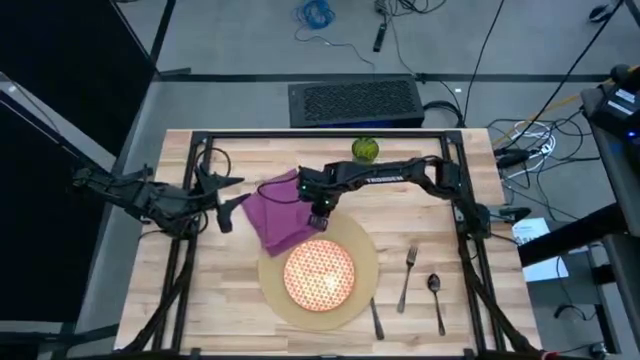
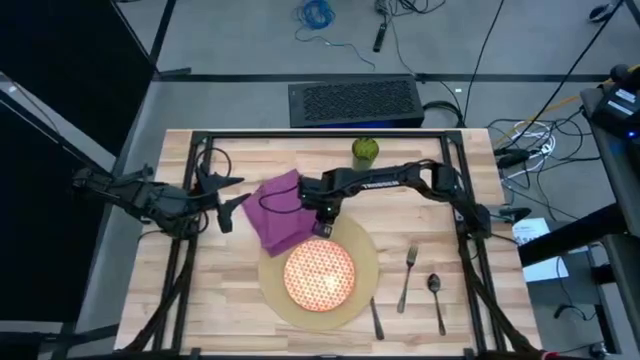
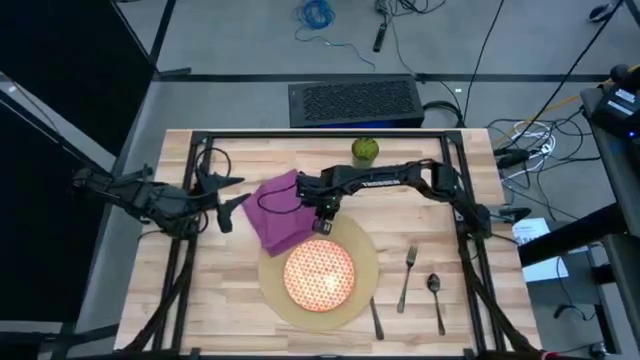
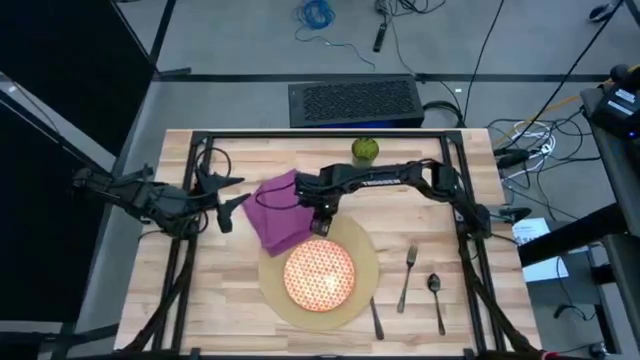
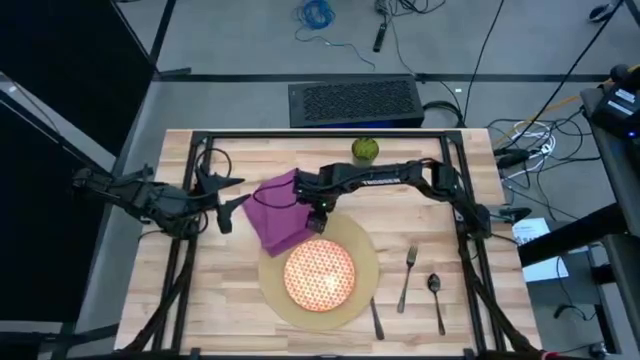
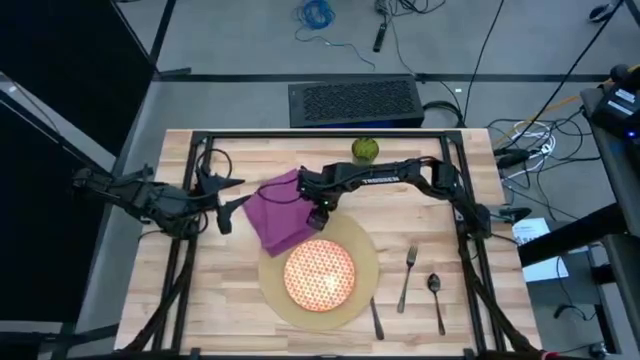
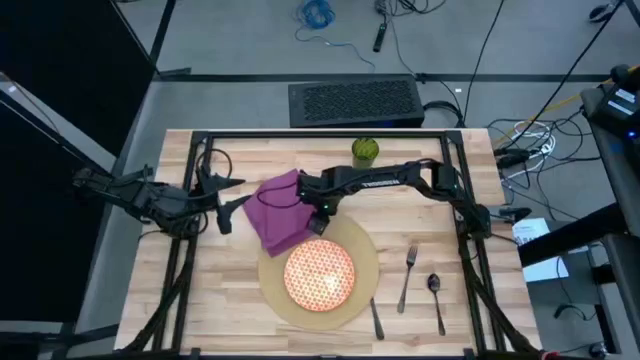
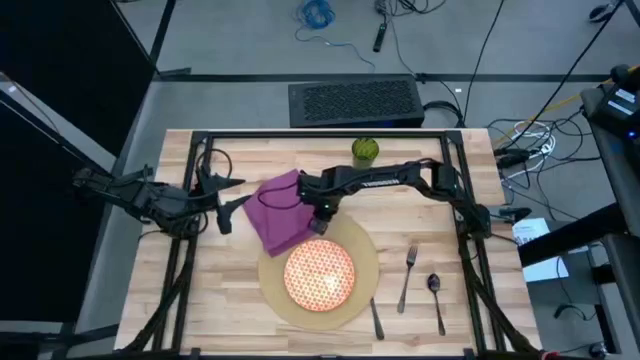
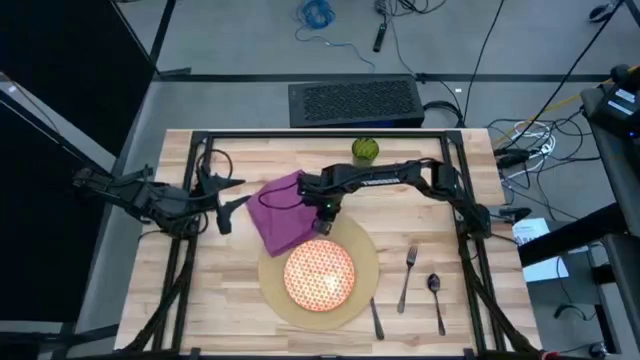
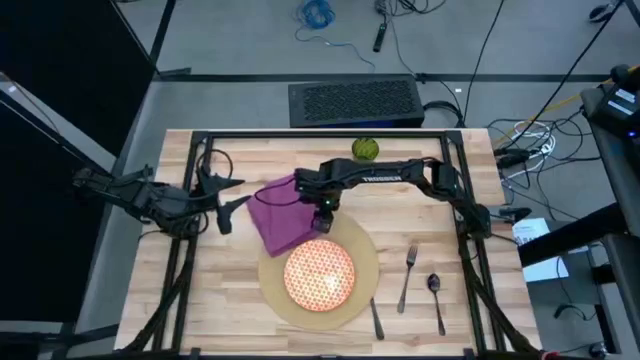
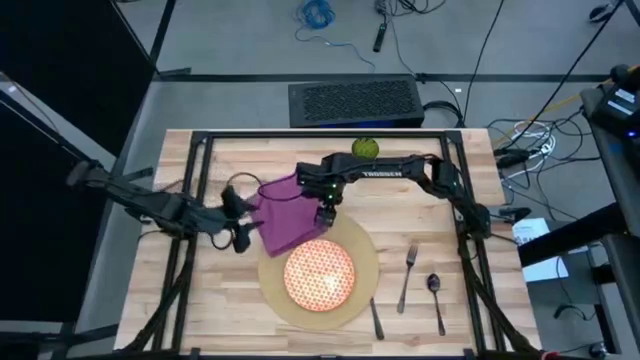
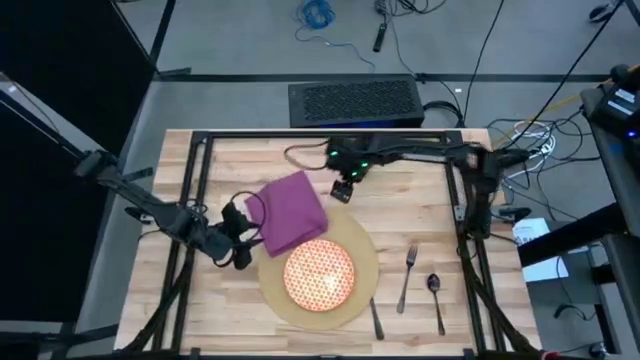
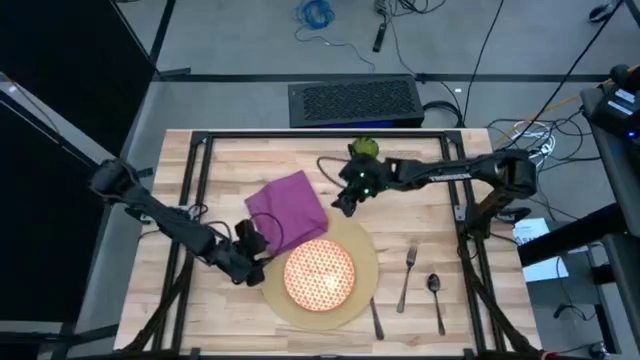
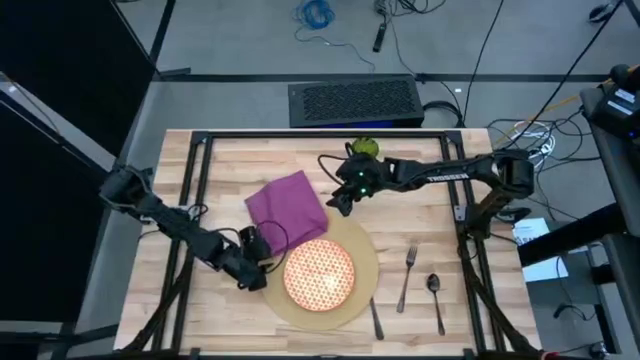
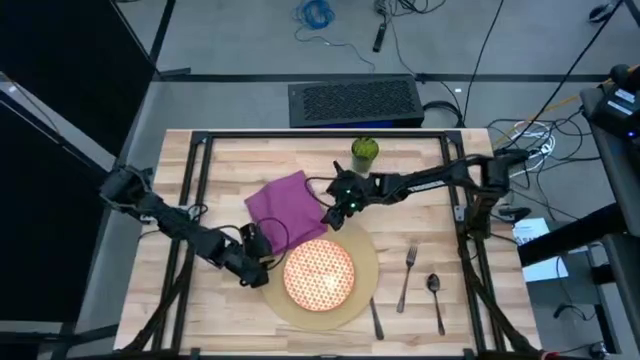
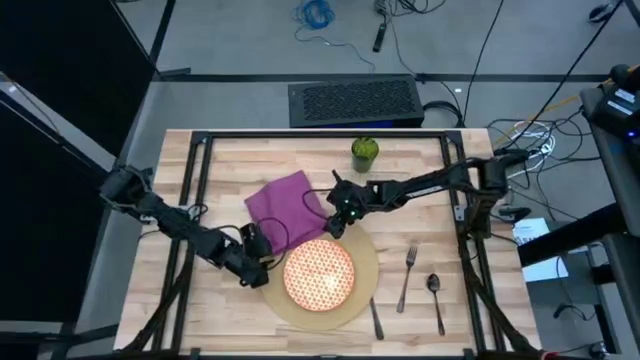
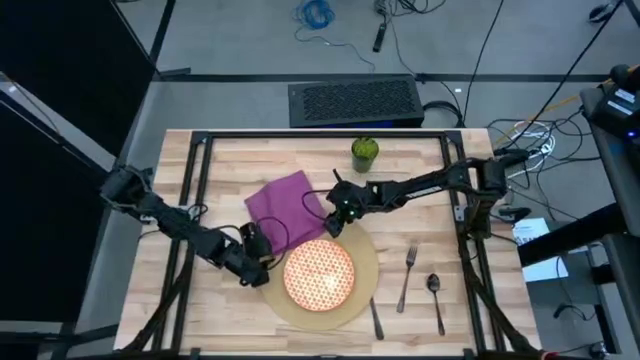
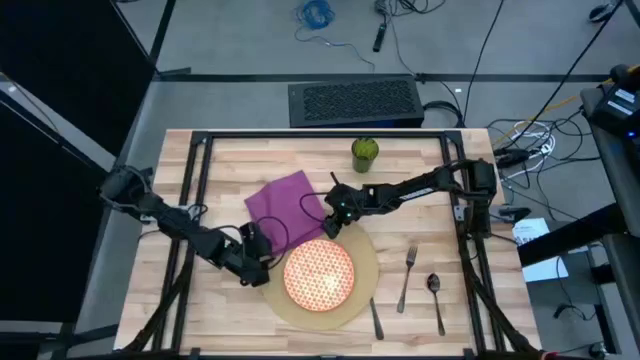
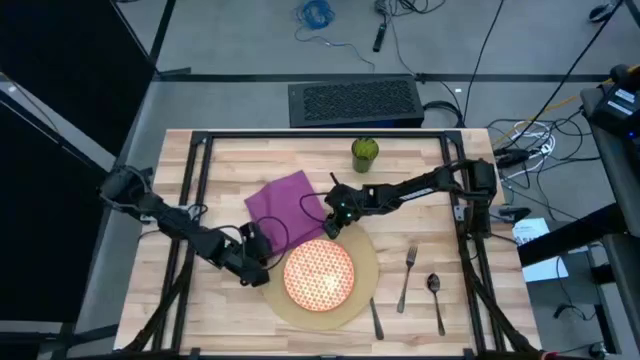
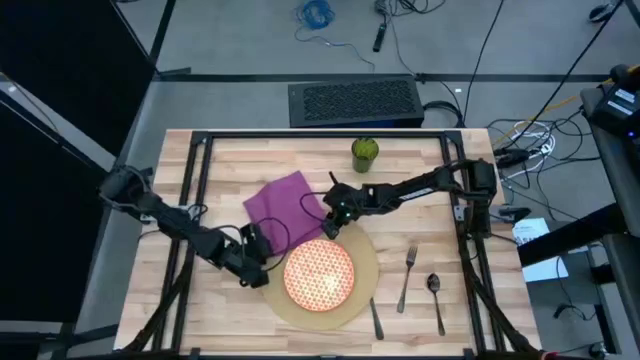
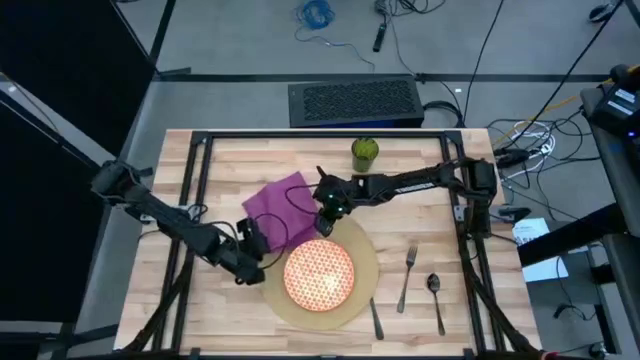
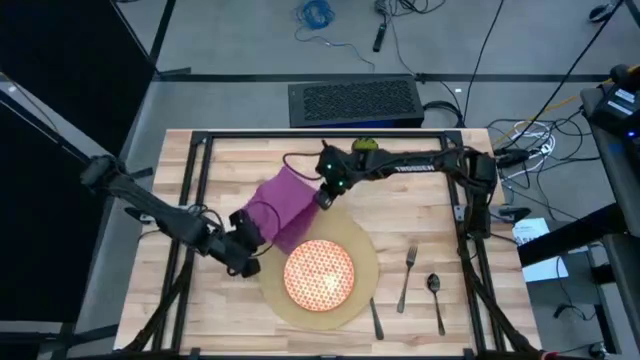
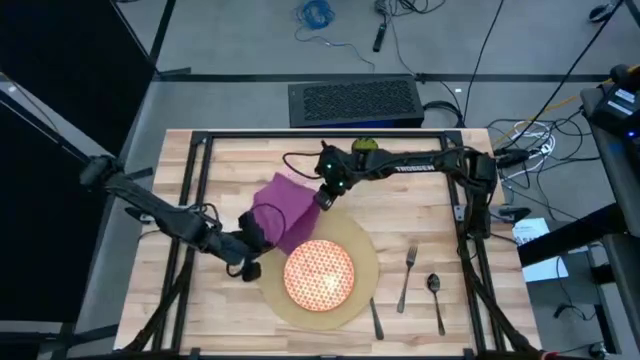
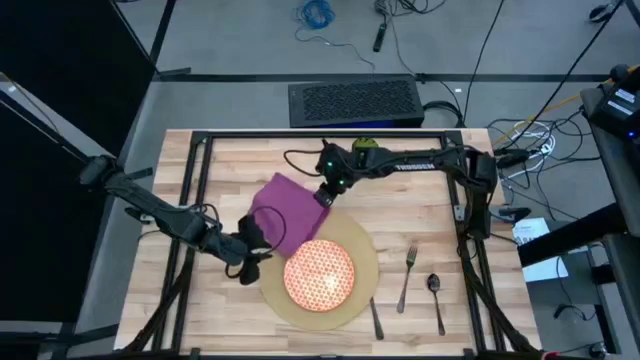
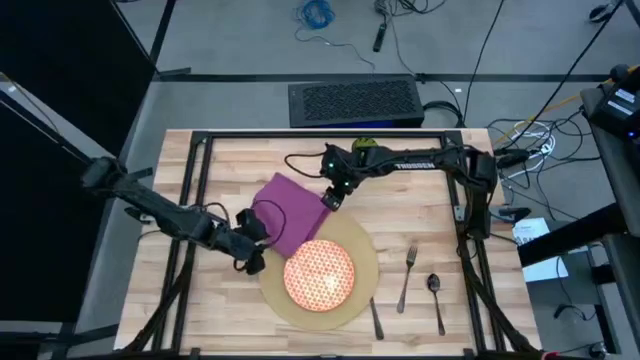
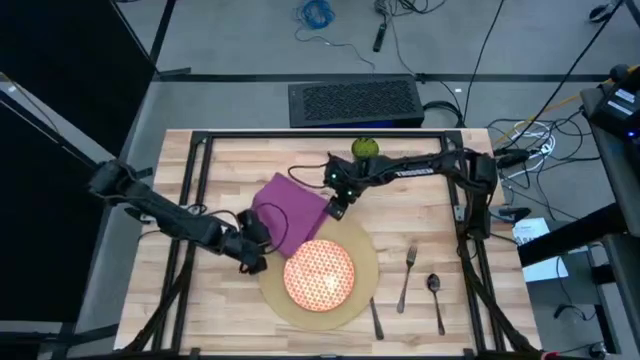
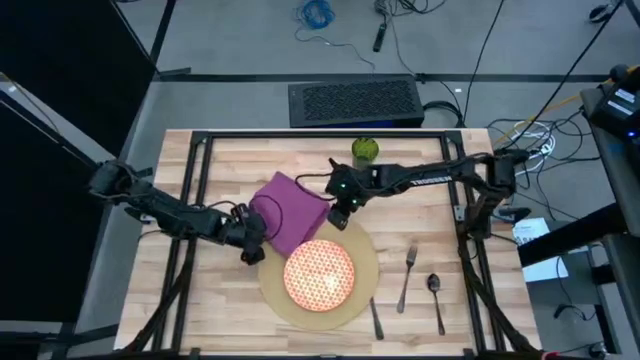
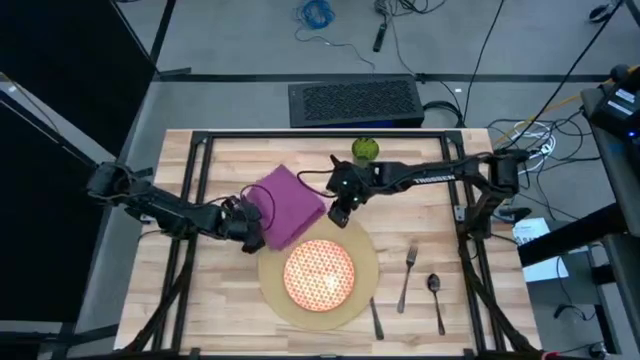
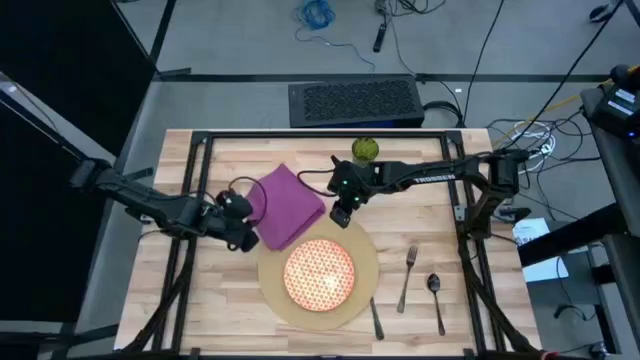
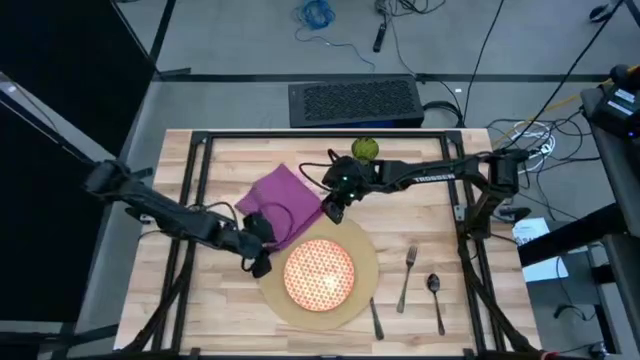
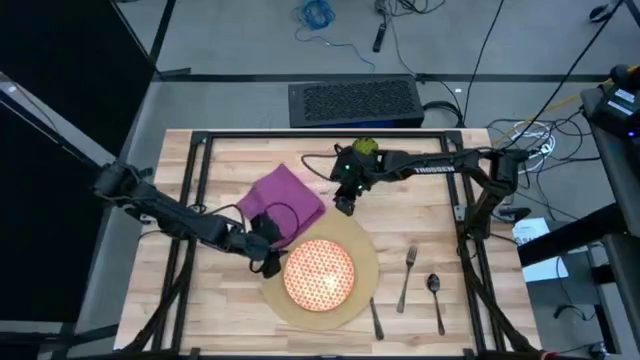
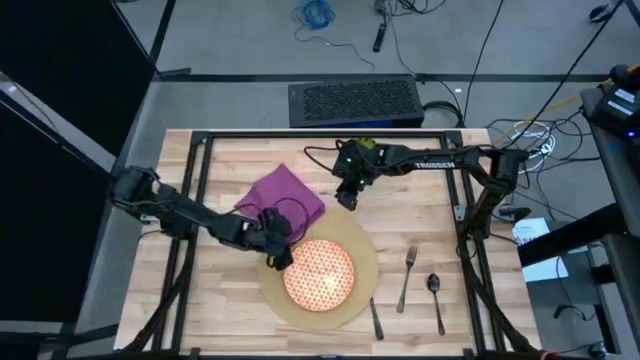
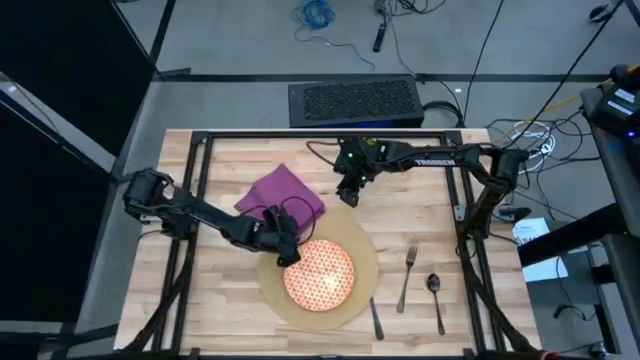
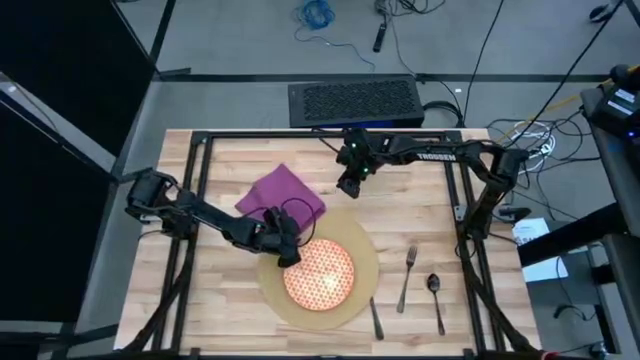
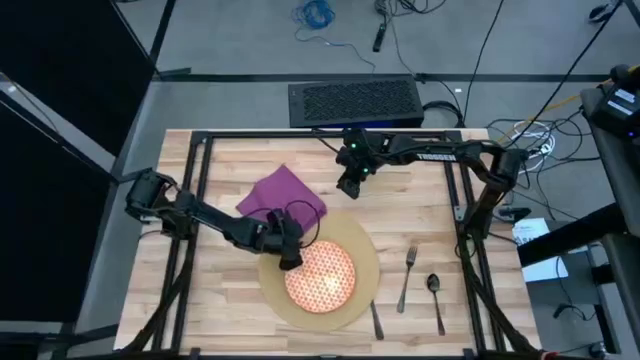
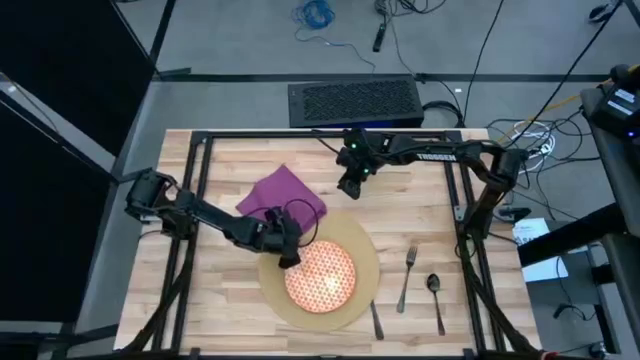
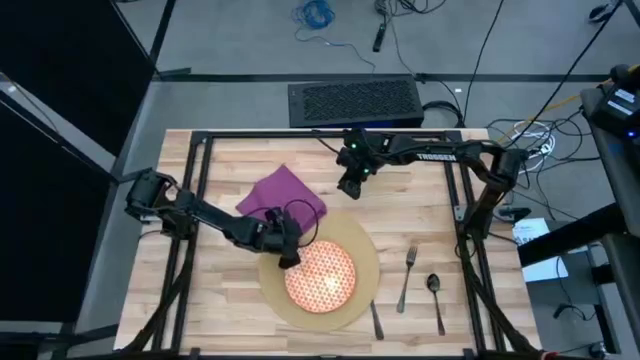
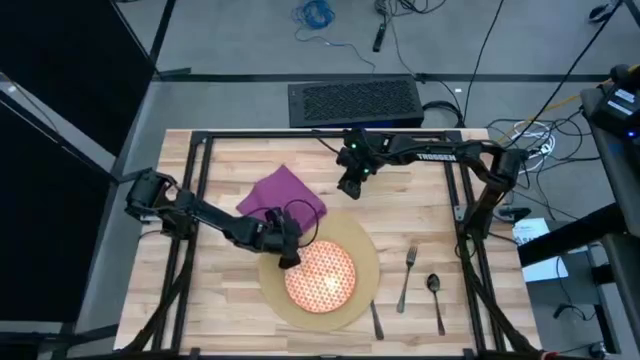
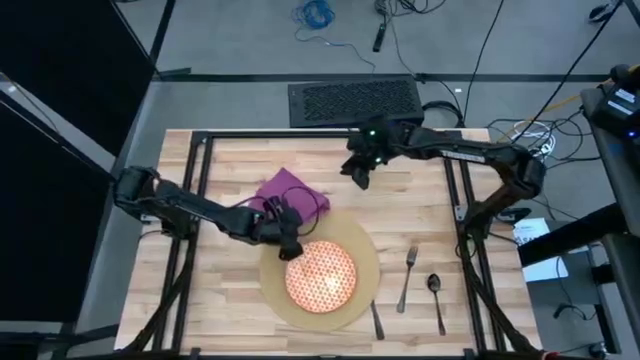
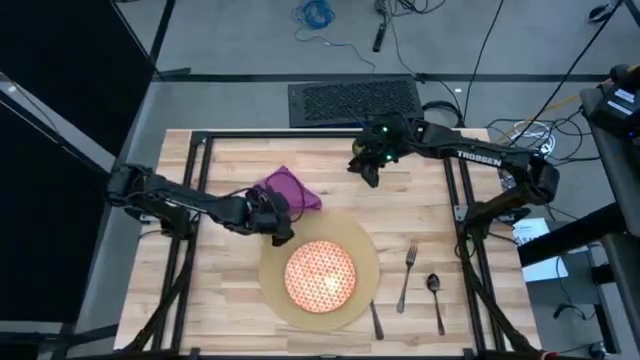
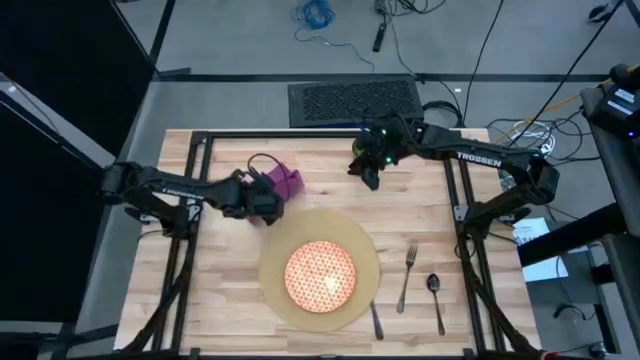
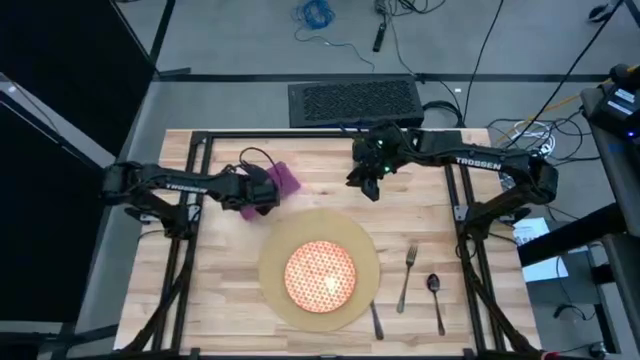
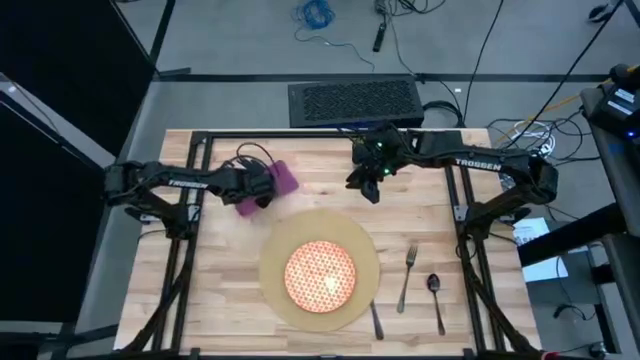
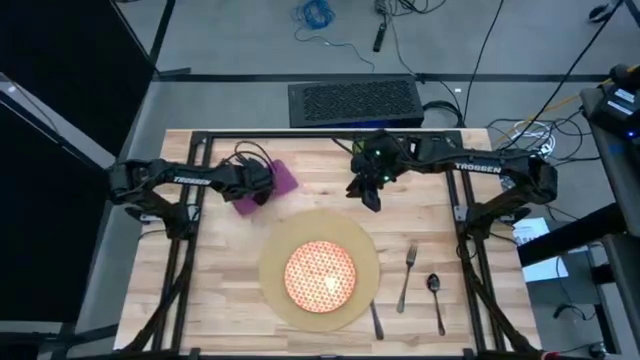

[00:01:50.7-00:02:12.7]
Task: Set table place
Fold the purple table napkin
